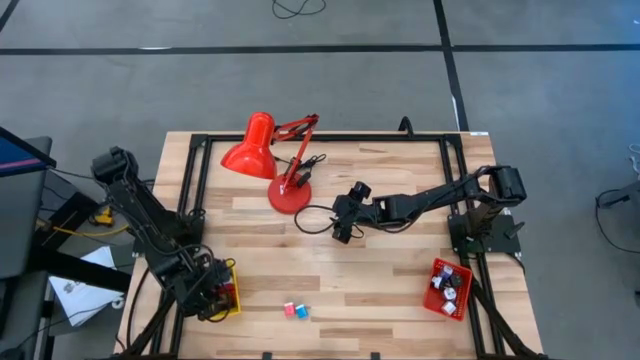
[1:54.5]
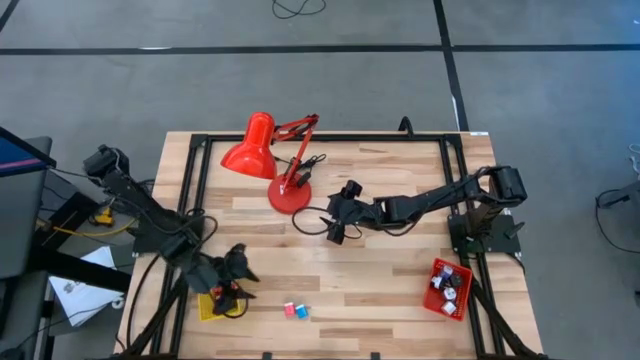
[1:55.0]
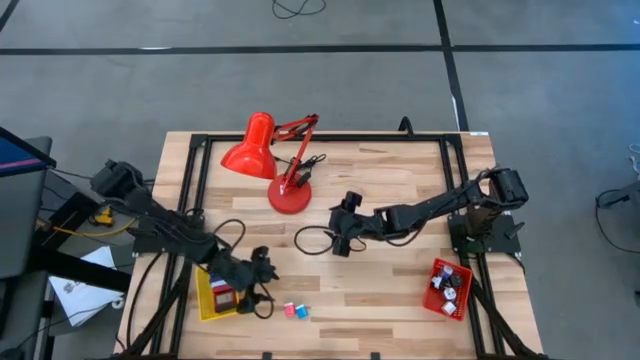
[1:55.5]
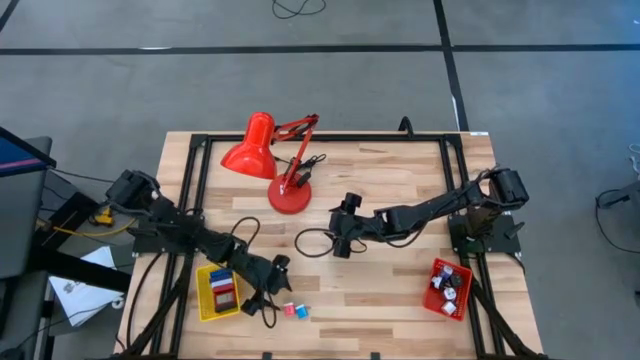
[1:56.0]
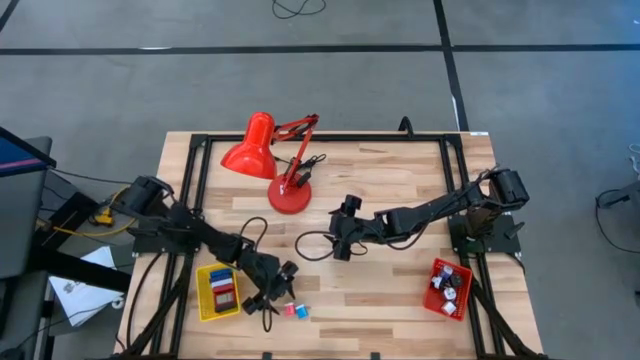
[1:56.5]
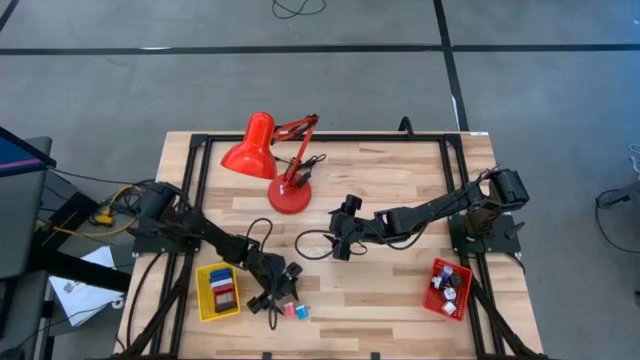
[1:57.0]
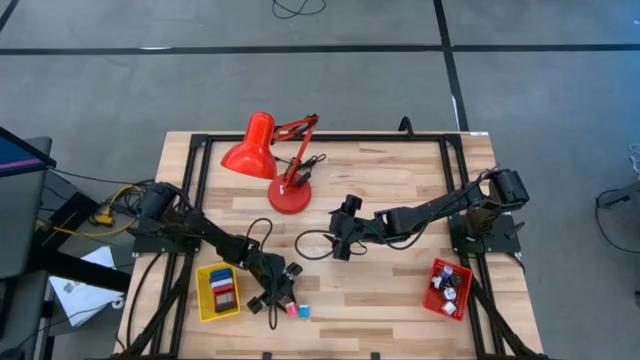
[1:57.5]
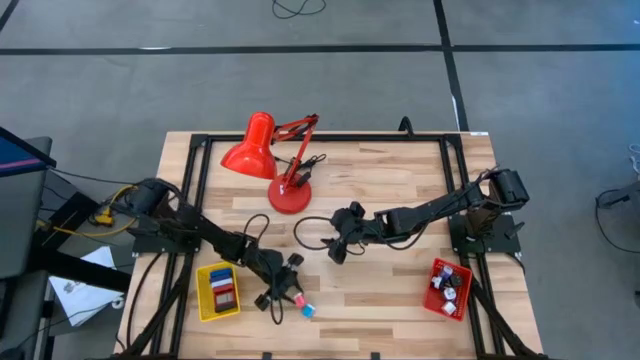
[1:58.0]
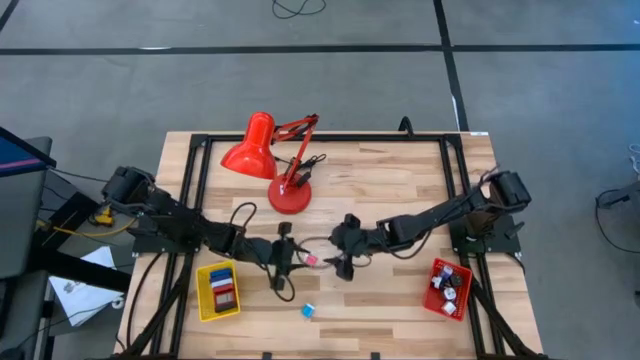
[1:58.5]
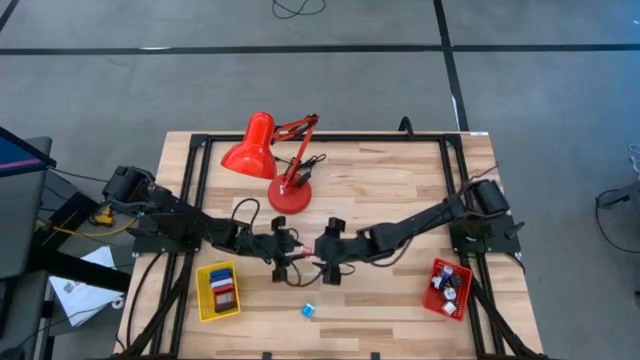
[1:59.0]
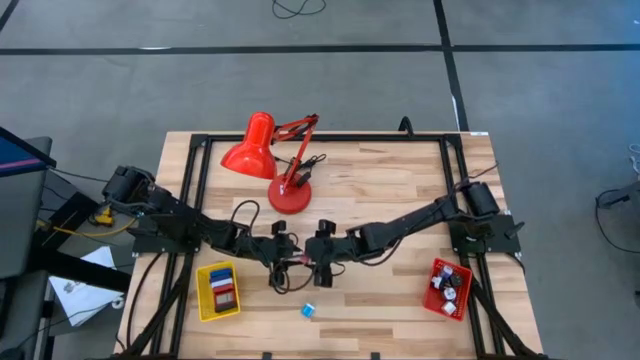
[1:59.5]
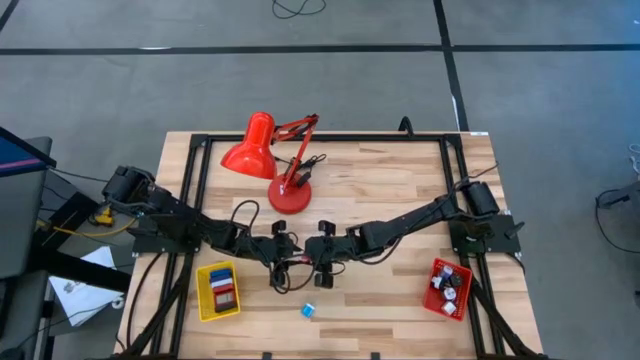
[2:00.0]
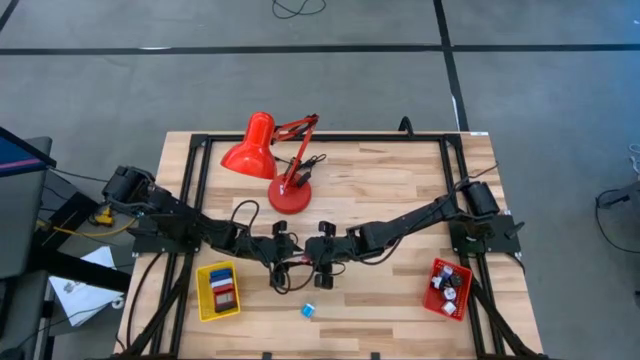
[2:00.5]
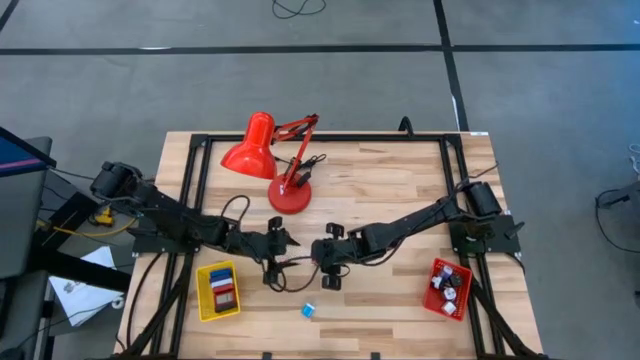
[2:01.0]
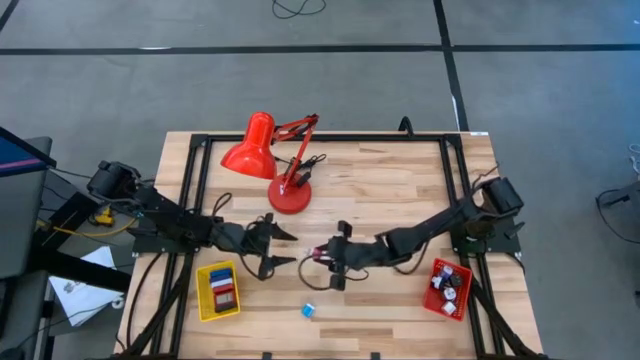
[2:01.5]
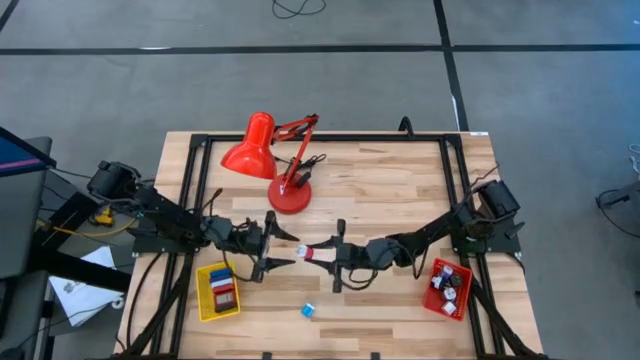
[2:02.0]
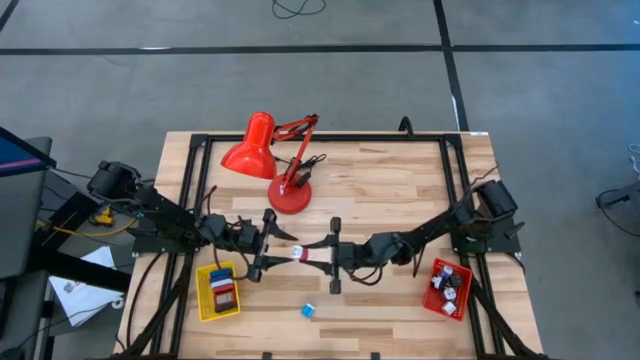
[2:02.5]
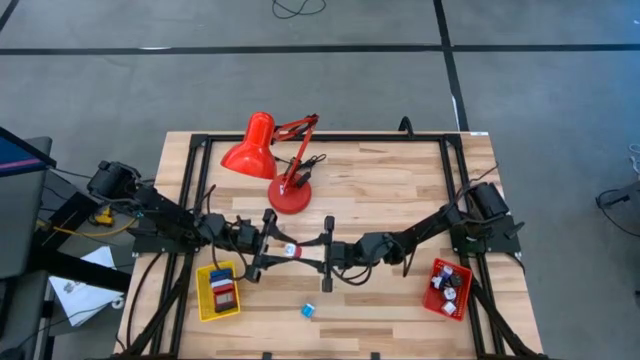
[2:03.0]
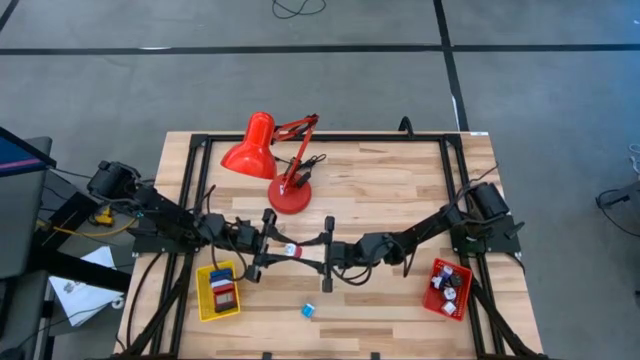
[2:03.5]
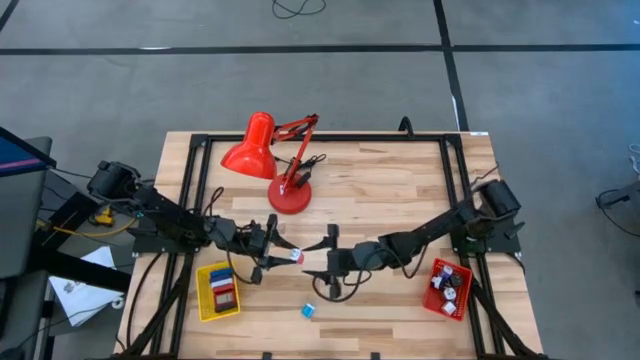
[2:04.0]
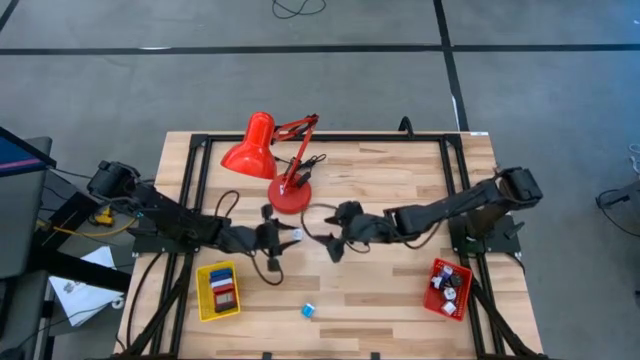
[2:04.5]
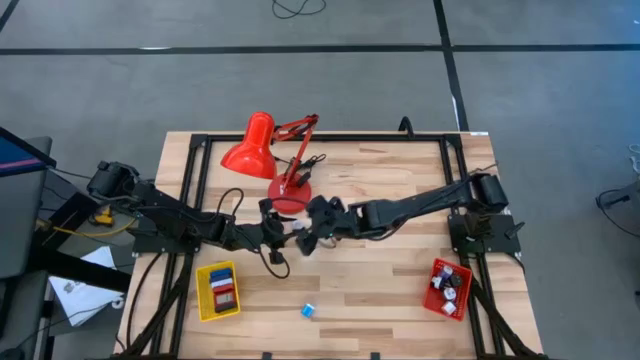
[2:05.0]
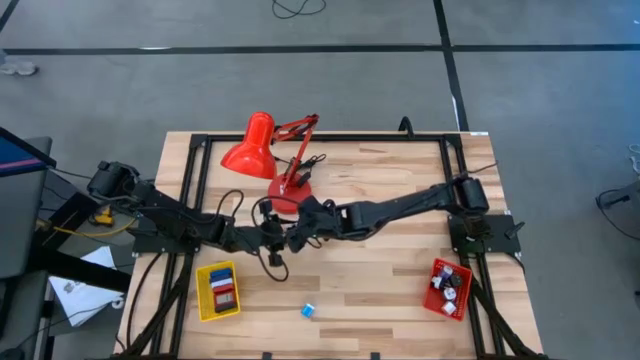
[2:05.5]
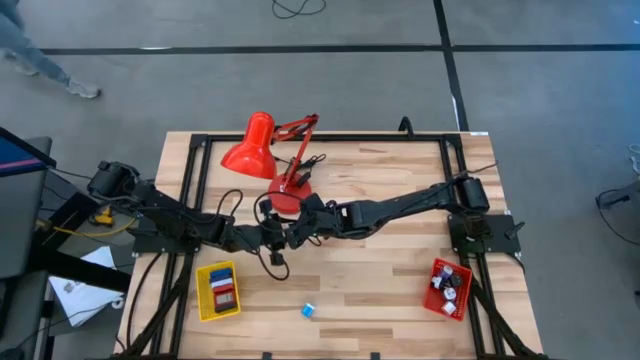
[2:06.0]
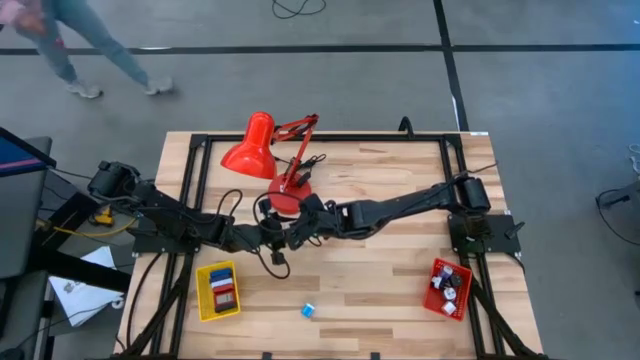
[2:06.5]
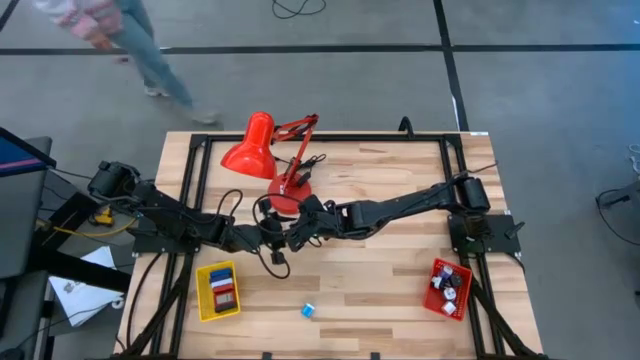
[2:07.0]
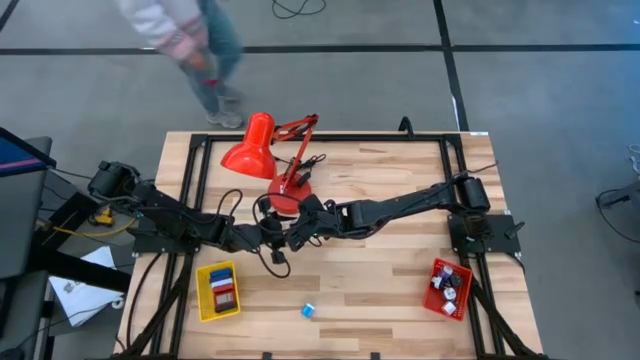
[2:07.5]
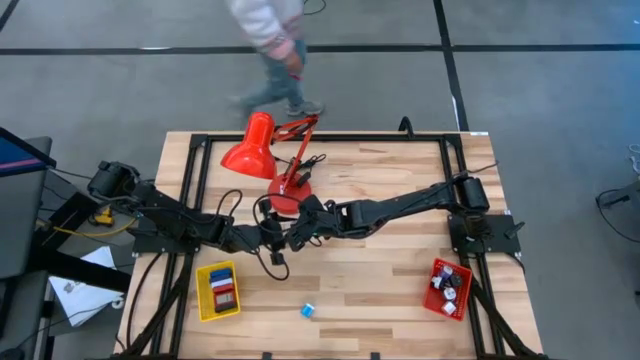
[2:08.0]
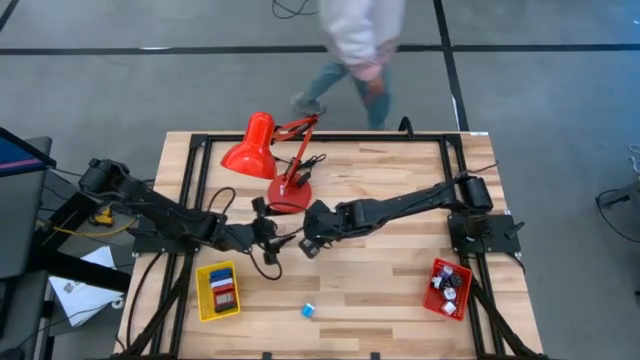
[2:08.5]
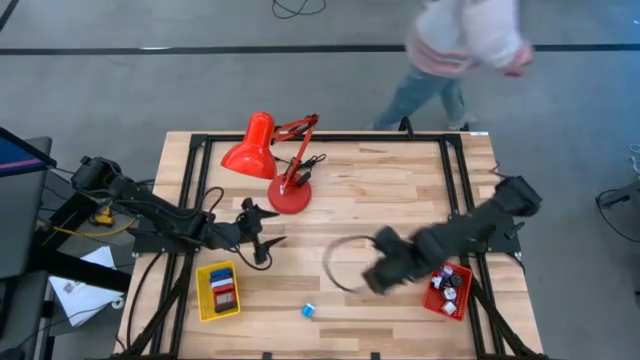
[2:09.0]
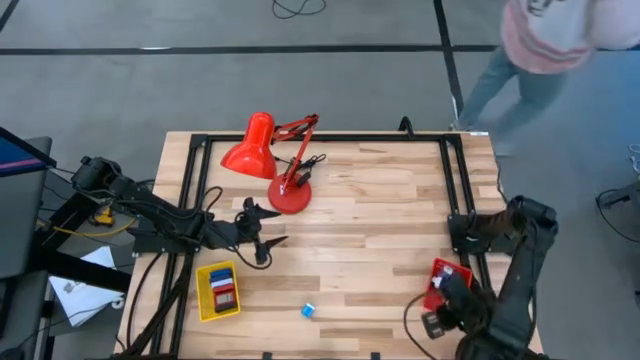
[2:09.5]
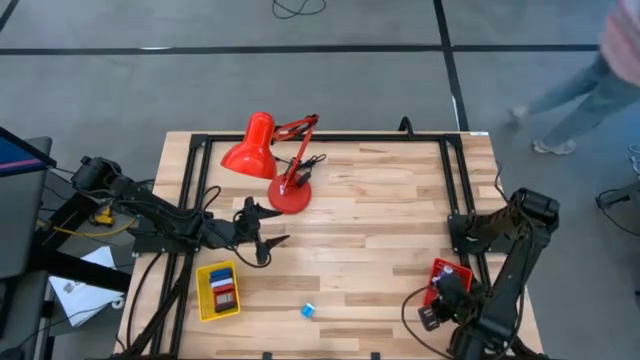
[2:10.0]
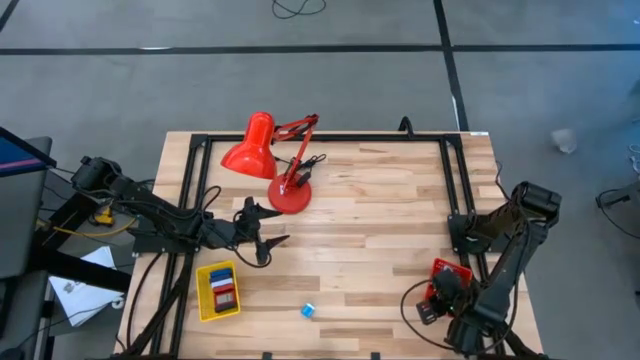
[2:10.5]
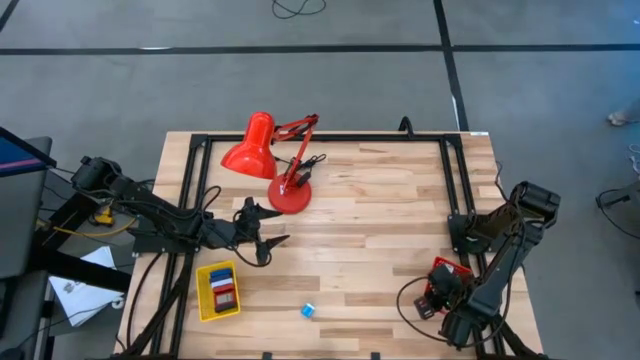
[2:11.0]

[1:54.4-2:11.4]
Task: Pick & Place Office items
Put the pink charger adapter into the red bin

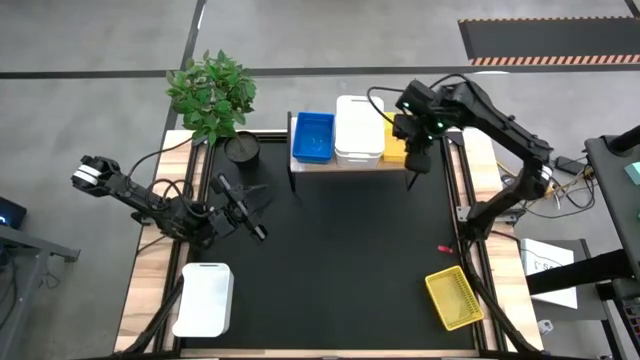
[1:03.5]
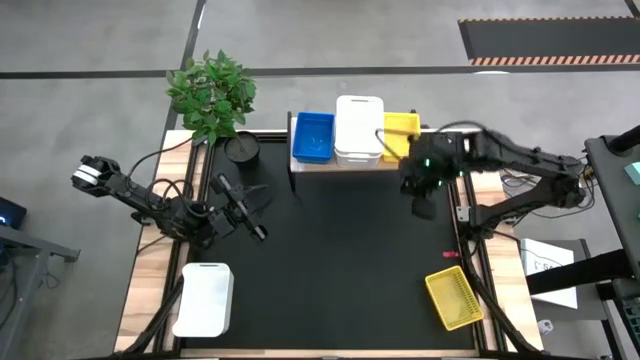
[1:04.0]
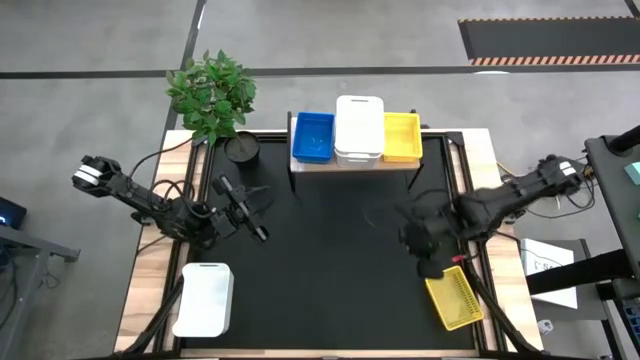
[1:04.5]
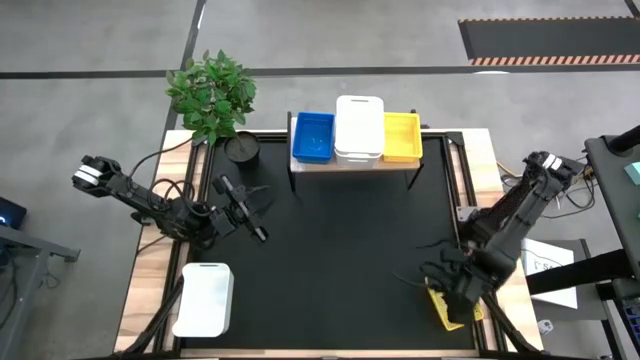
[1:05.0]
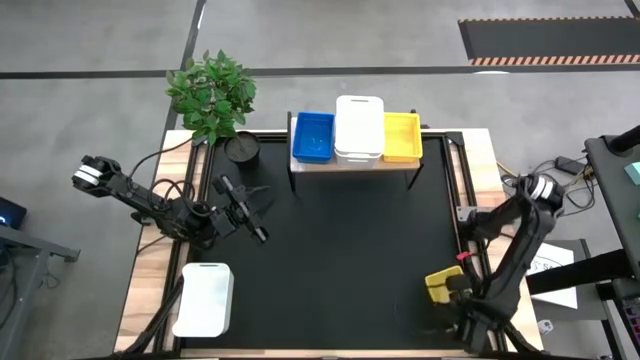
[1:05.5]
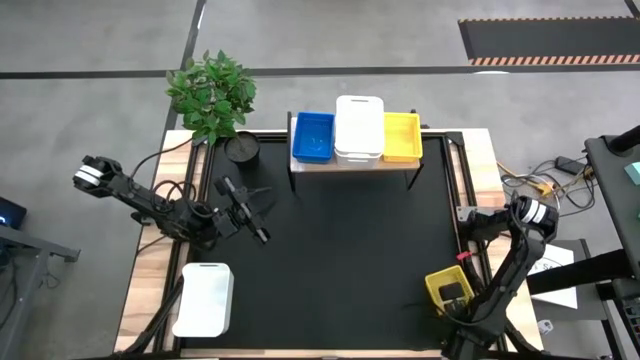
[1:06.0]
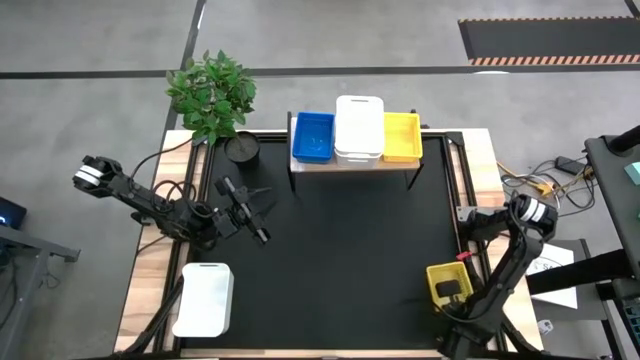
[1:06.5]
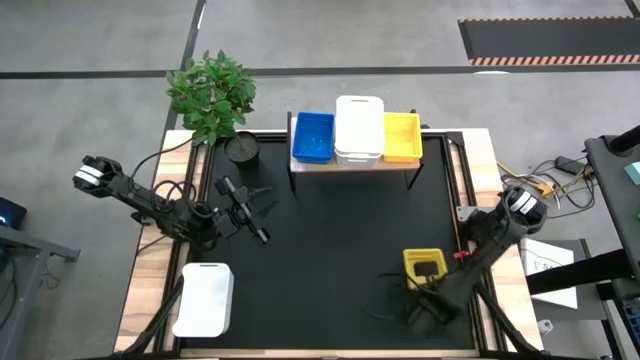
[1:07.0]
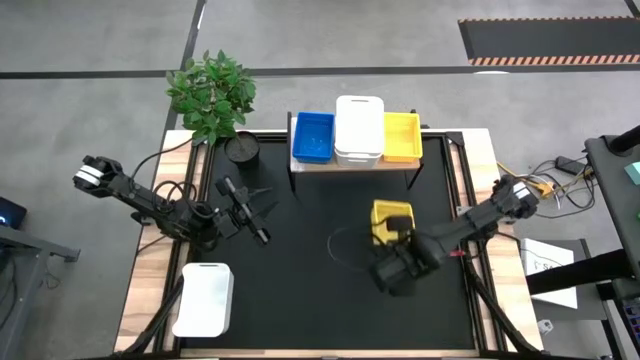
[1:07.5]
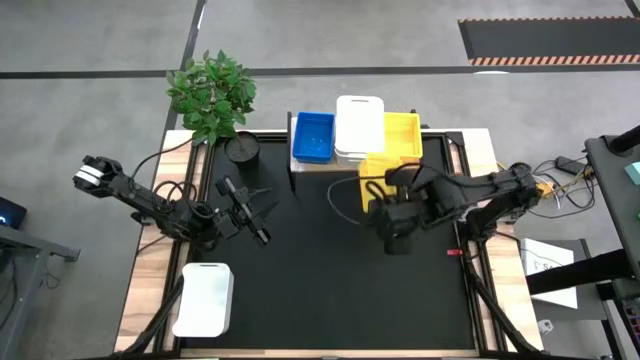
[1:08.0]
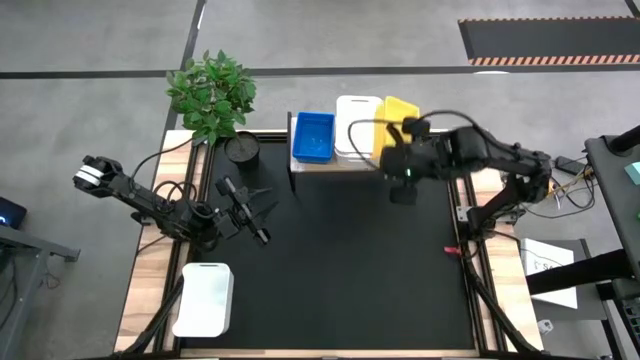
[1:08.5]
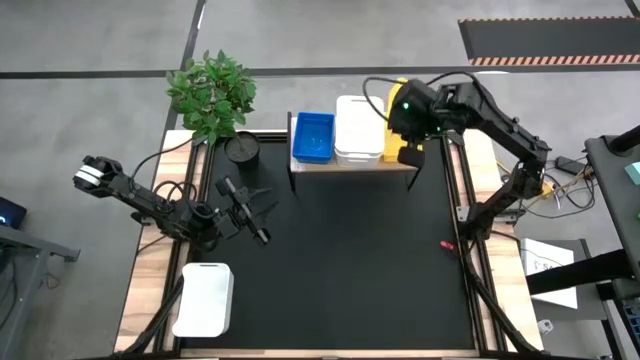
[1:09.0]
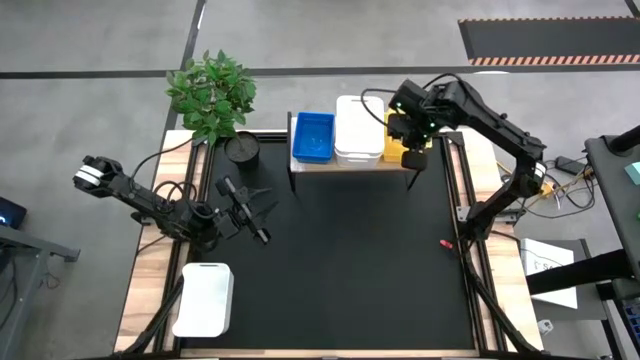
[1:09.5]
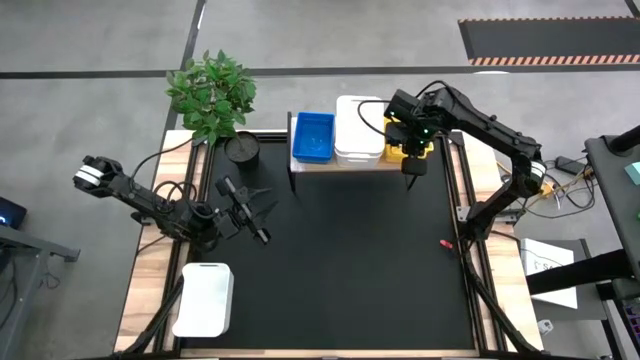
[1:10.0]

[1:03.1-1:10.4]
Task: Stack baskets on shelf by color
Stack the yellow bin on the other yellow bins on the shelf
